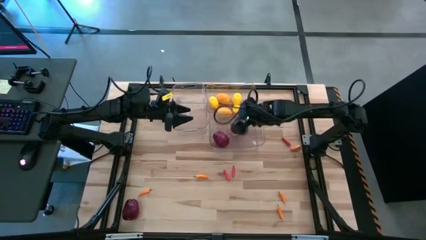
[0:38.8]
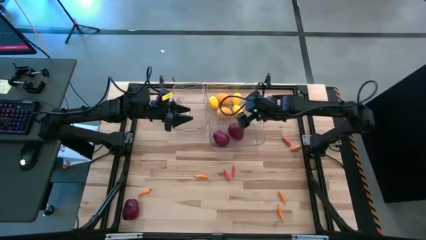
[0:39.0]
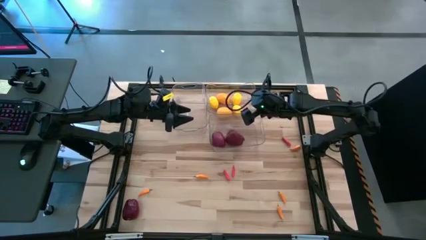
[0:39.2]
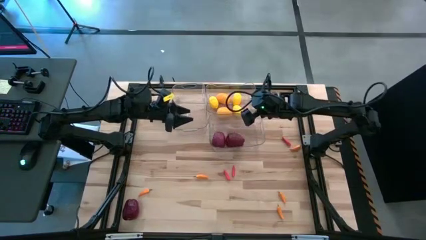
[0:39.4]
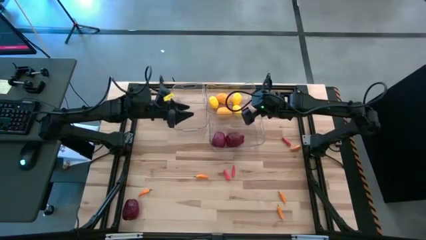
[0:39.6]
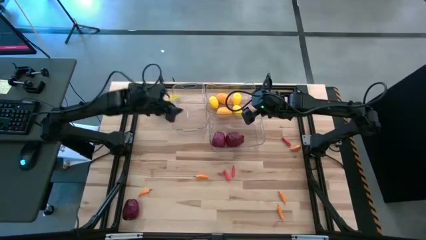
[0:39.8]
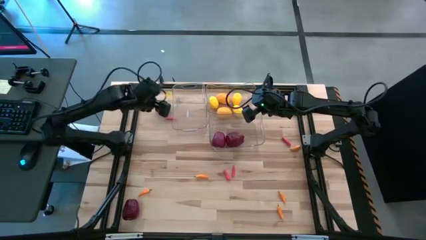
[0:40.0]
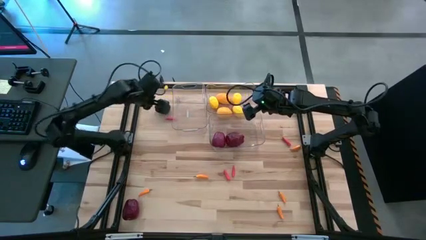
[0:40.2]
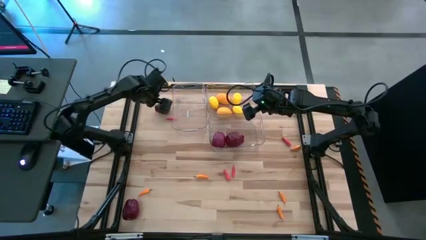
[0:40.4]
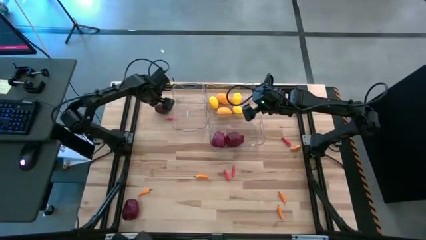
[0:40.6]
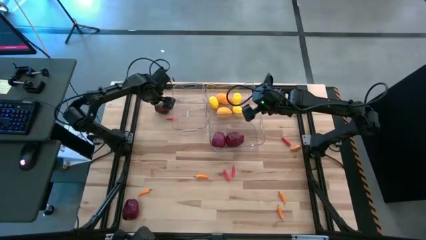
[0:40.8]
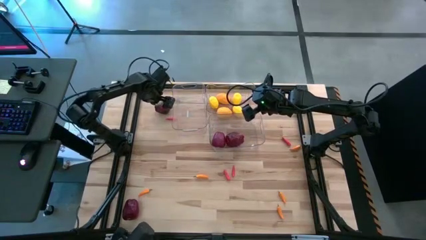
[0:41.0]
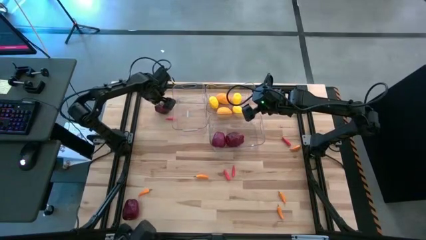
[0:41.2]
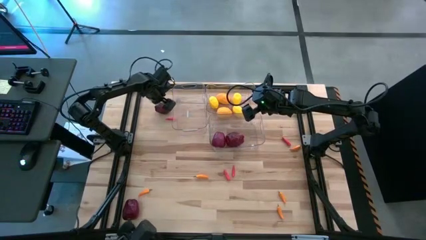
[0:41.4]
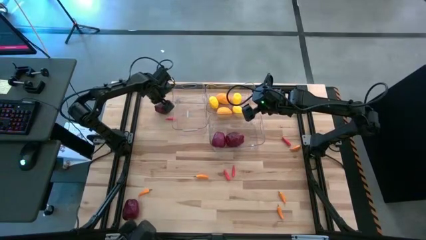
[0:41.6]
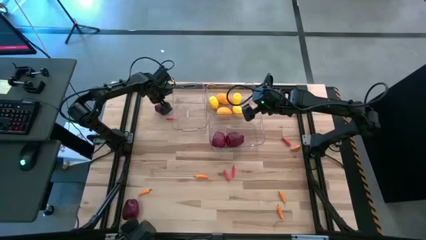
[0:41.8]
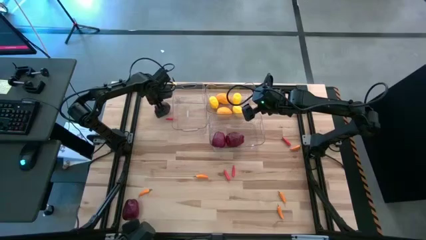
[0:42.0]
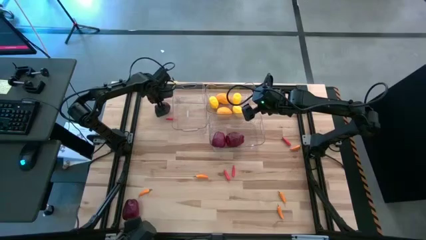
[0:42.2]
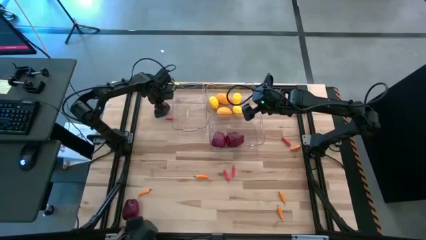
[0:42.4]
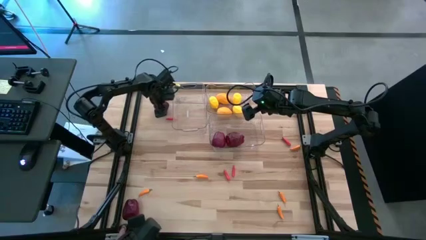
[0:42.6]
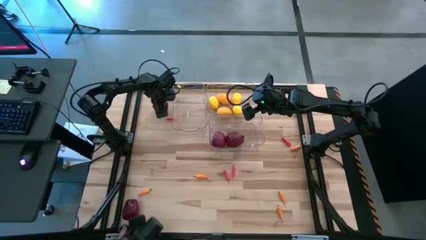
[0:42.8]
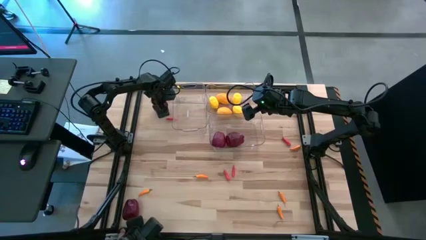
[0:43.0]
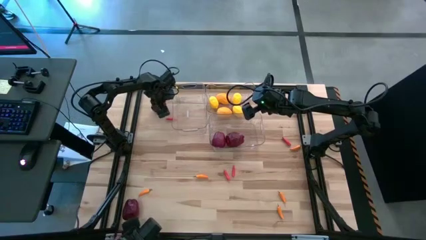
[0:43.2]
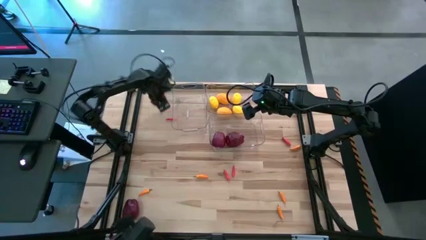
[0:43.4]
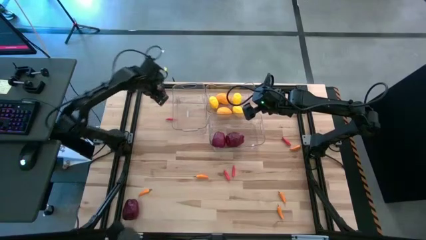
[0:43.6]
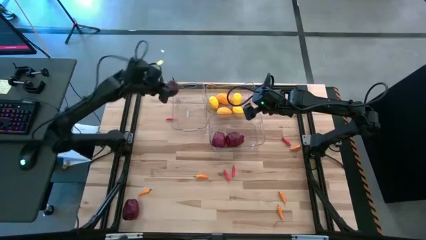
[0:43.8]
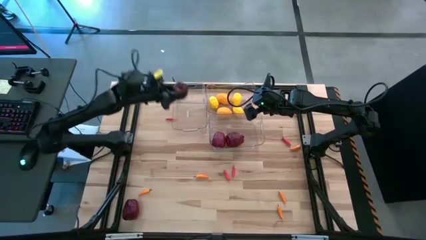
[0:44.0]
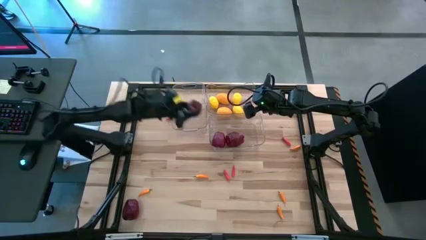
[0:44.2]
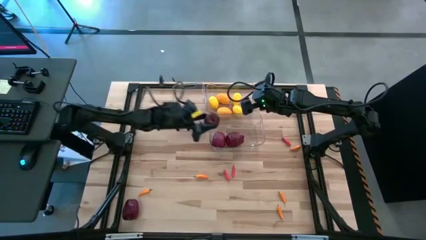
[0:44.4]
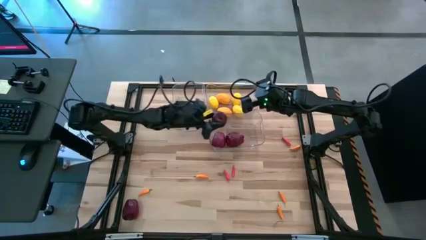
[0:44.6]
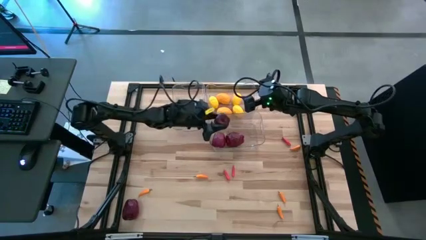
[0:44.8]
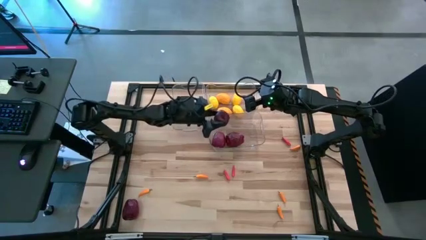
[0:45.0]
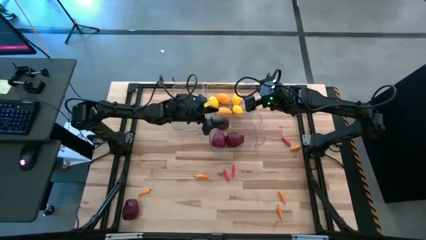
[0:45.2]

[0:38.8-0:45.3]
Task: Sort produce into baskets
Put the apple into the bottom transparent bin

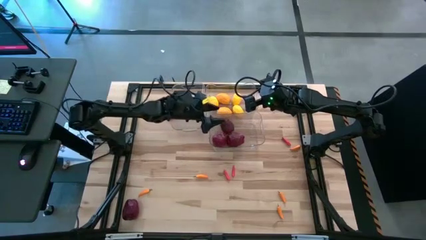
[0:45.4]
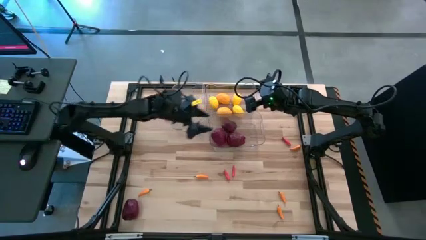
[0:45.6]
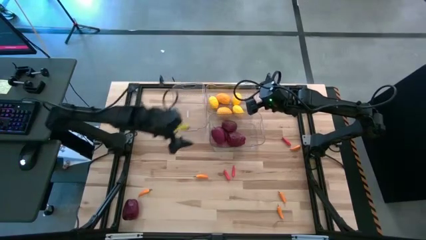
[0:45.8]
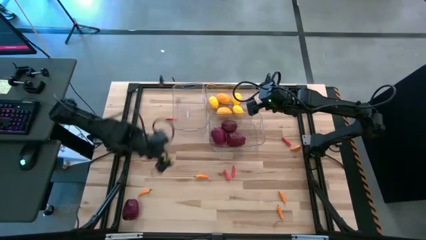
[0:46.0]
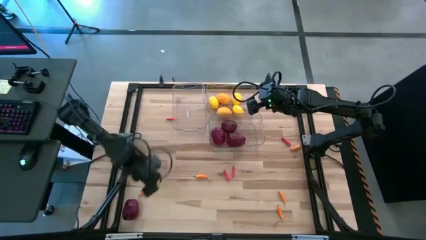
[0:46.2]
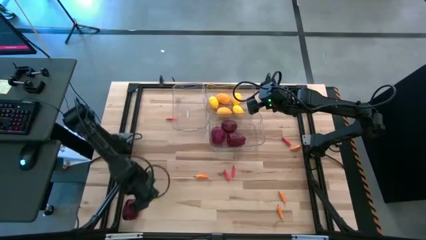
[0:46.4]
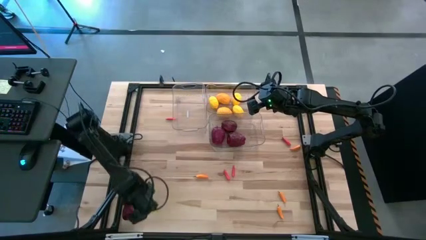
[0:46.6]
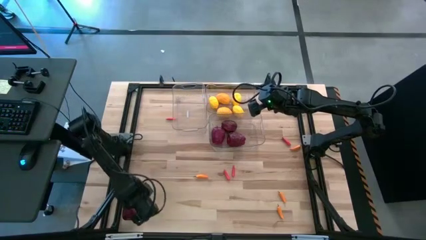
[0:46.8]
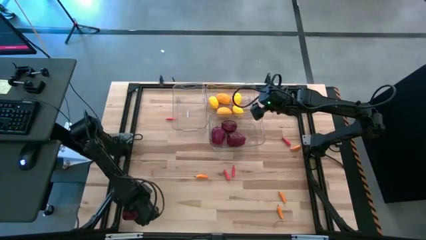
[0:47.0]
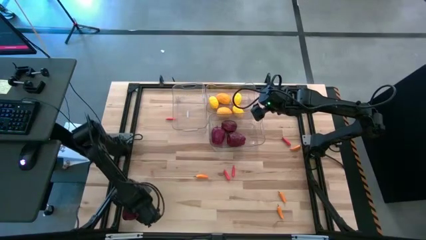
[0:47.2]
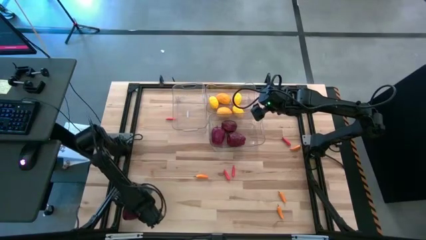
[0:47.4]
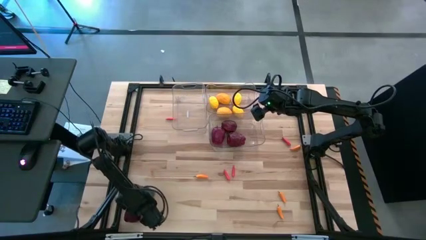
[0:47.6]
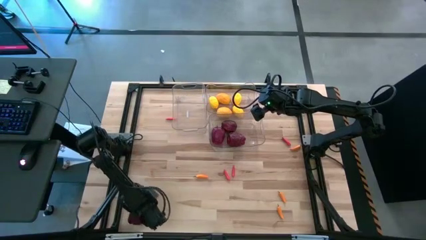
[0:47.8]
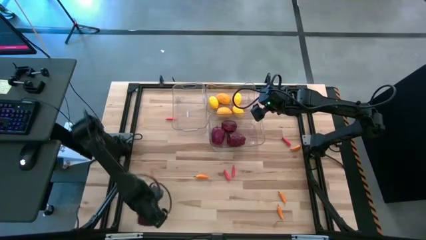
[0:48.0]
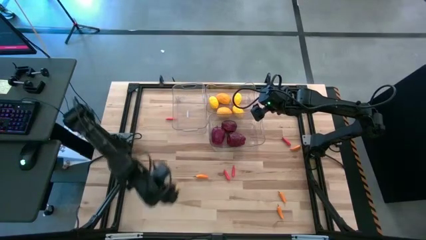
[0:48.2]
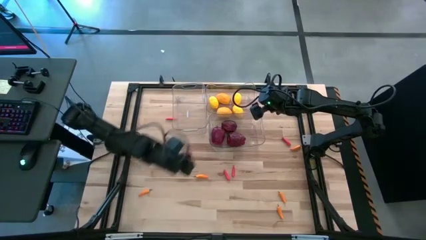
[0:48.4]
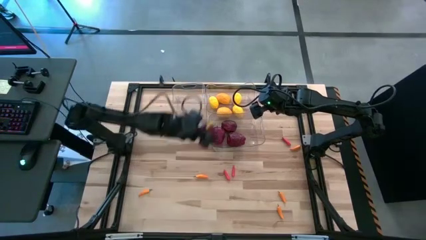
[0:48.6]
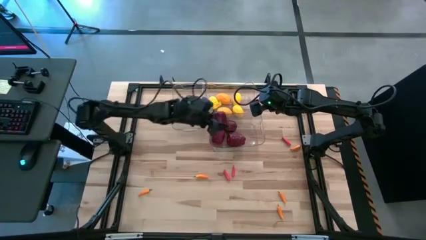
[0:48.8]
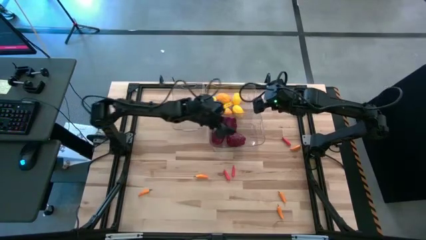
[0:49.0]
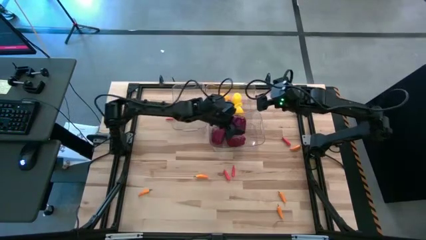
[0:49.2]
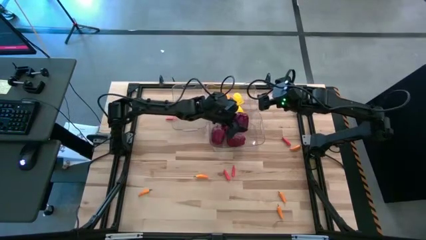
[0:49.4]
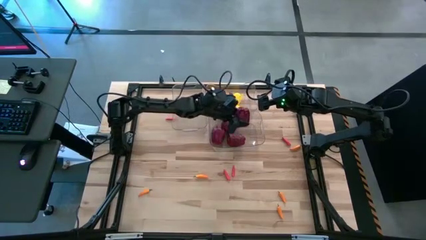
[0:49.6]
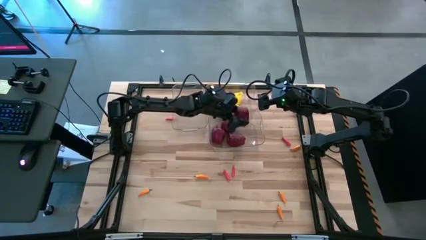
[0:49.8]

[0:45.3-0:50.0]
Put the apple into the bottom transparent bin

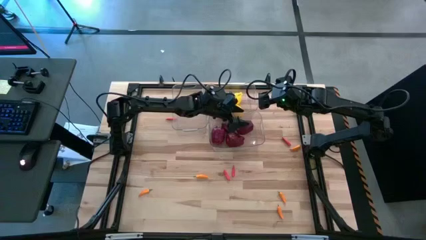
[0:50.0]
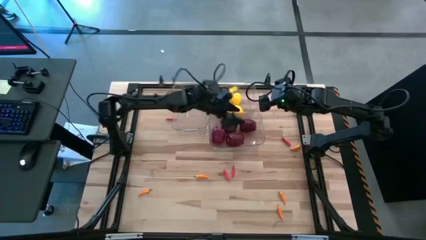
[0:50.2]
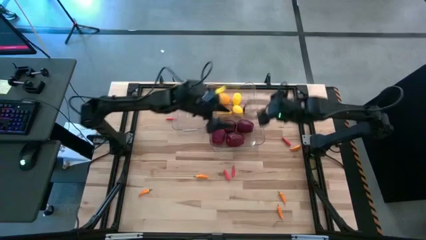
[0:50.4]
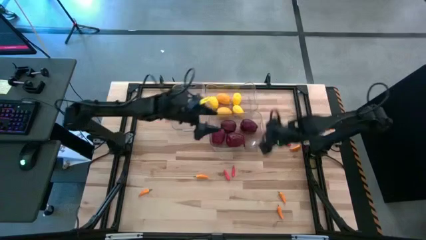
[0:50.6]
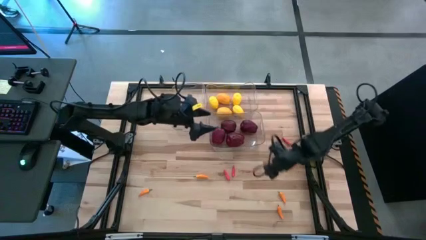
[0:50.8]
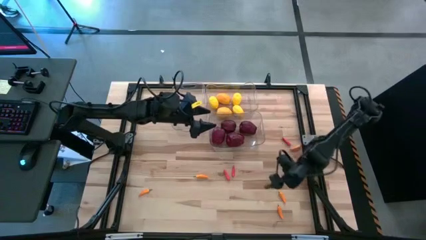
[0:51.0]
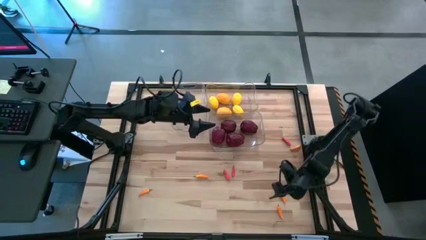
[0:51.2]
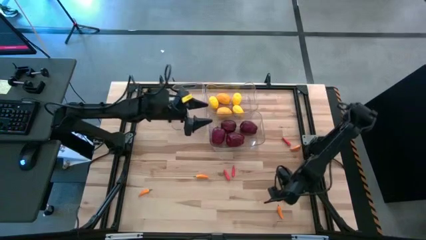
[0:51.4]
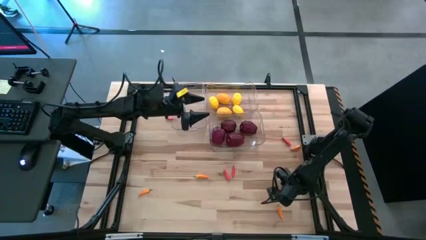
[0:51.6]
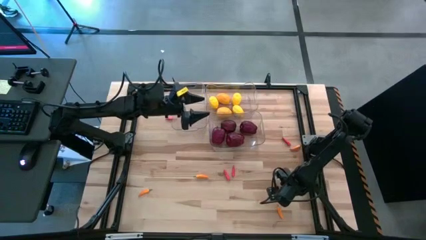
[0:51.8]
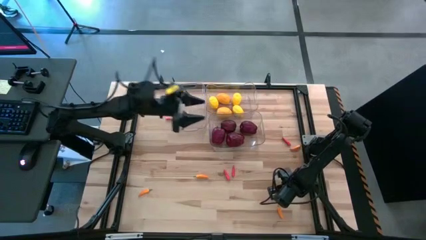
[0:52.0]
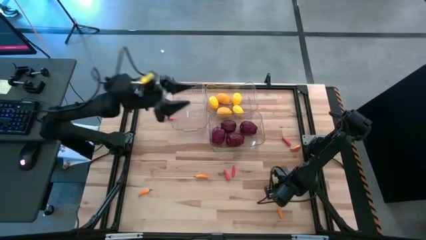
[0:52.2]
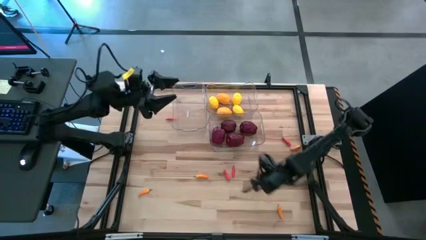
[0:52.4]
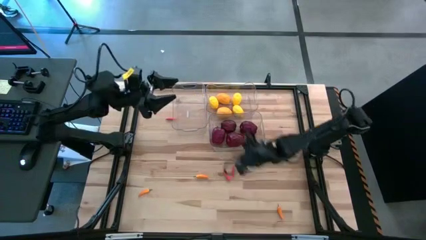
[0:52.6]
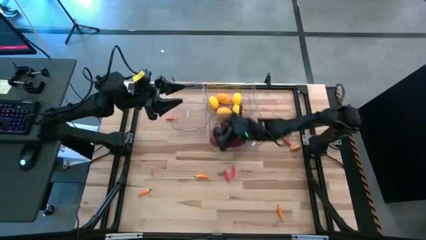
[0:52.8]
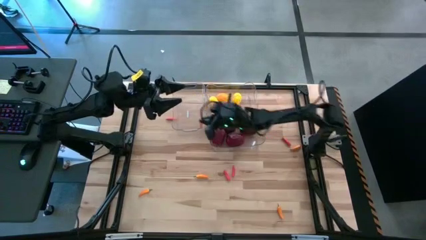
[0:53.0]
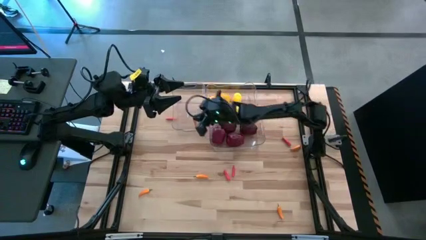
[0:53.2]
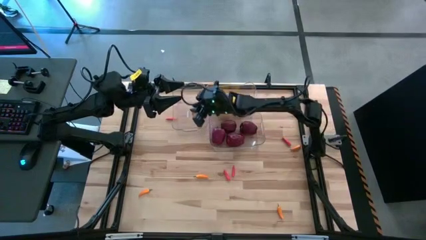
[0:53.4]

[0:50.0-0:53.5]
Put the orange chili pepper into the top left transparent bin

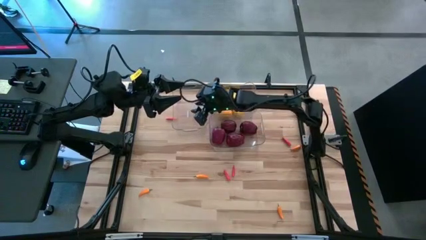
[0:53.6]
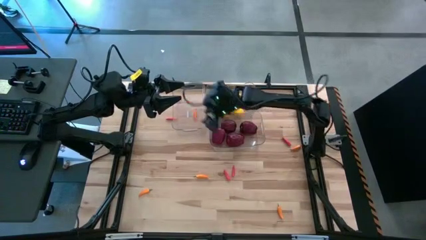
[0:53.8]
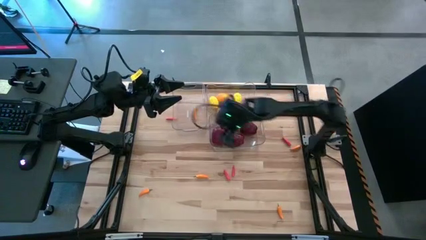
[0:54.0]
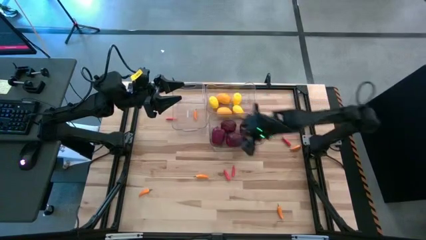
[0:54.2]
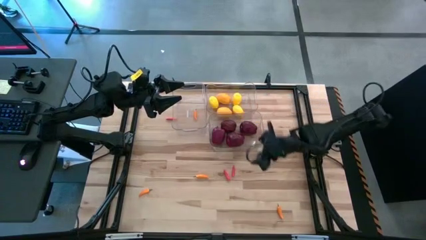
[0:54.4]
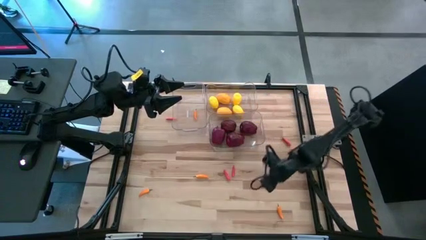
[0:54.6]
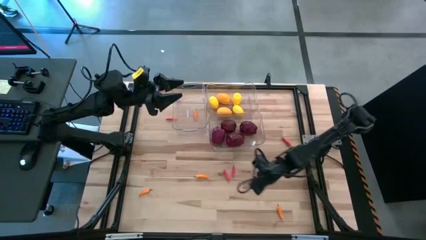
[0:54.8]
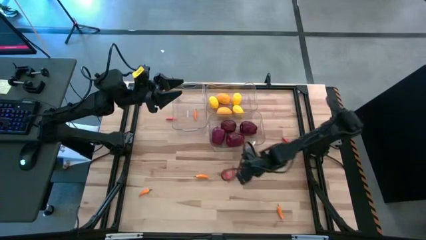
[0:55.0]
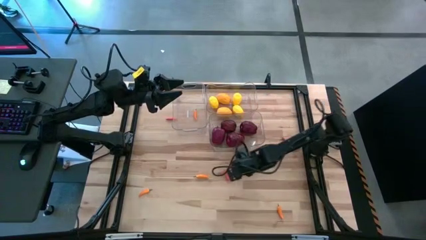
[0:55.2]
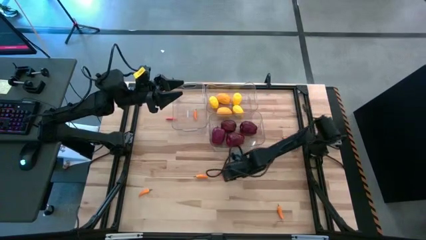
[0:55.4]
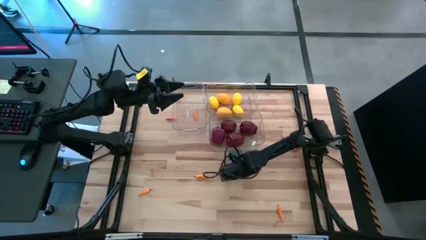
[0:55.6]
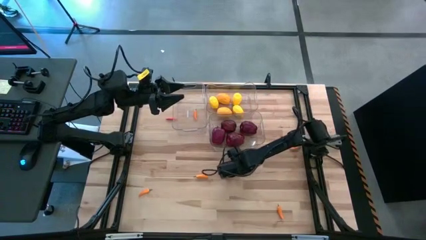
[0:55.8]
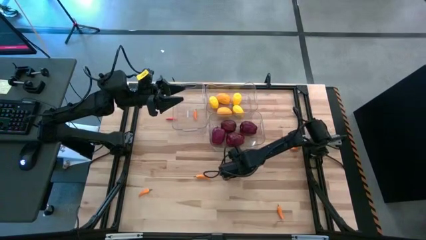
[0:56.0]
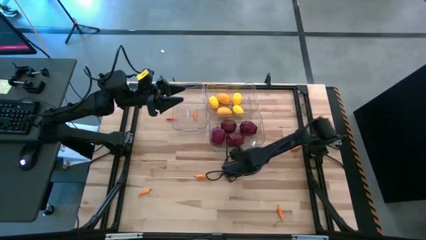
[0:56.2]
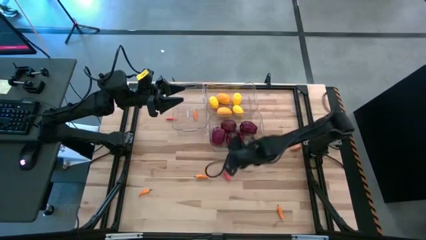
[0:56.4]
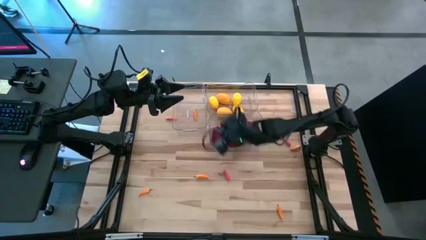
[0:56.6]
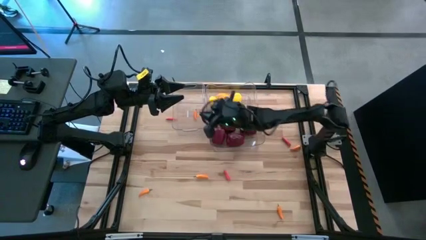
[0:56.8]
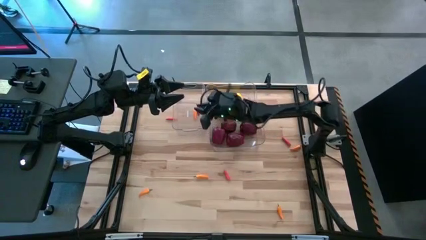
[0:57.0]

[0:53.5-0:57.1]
Put the red chili pepper into the top left transparent bin
